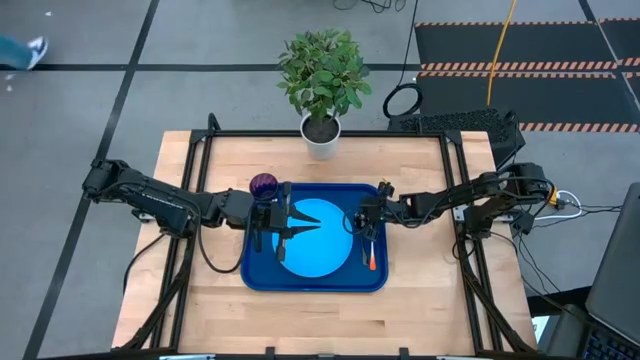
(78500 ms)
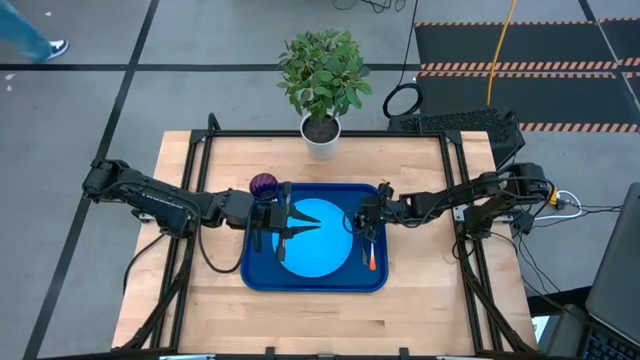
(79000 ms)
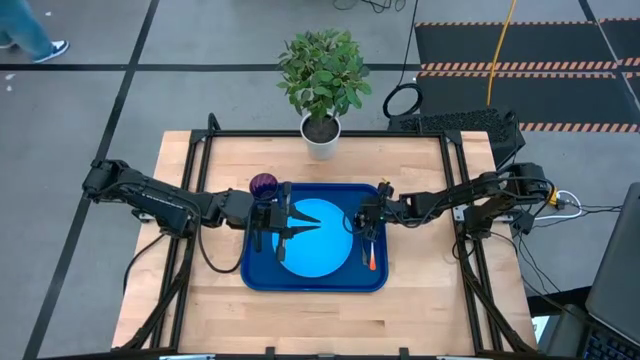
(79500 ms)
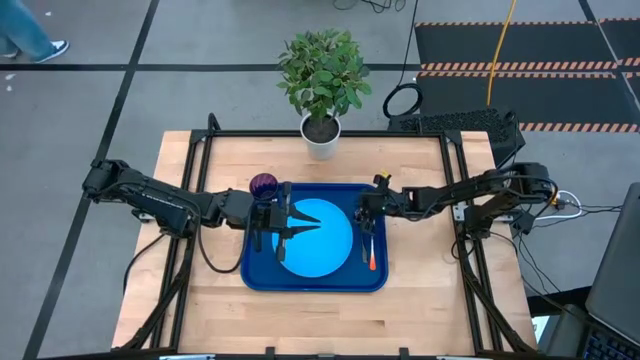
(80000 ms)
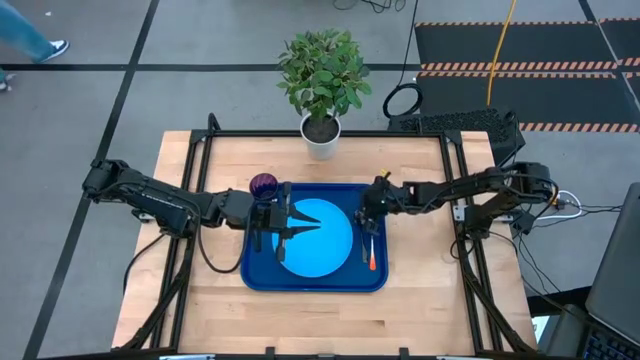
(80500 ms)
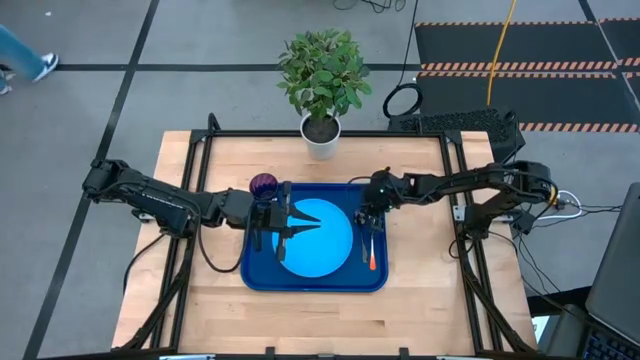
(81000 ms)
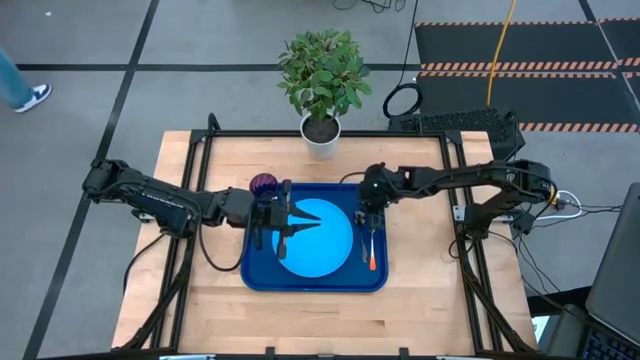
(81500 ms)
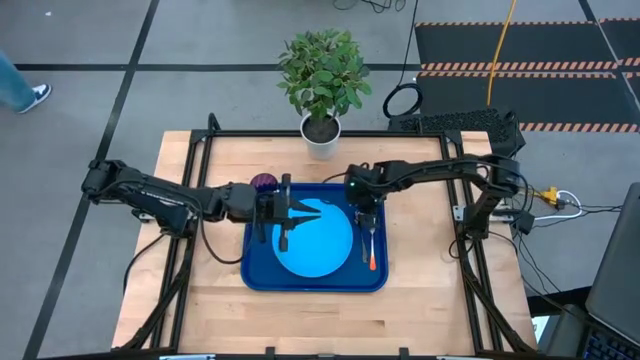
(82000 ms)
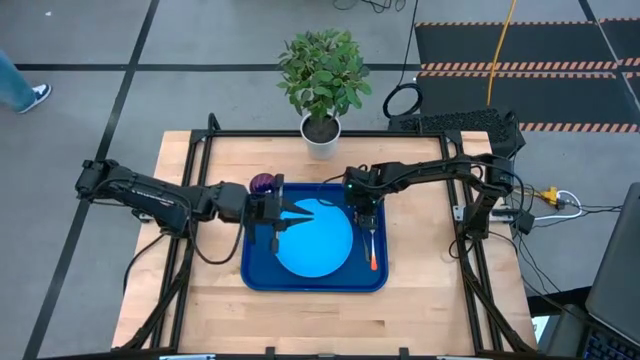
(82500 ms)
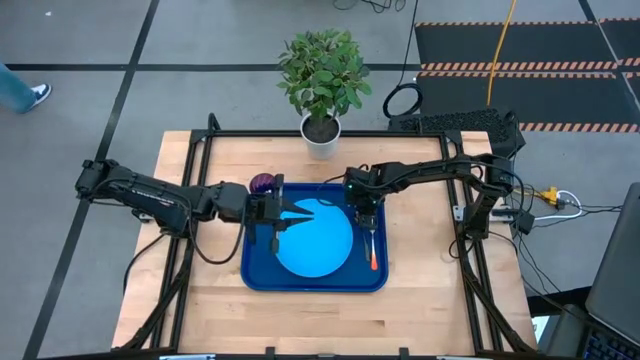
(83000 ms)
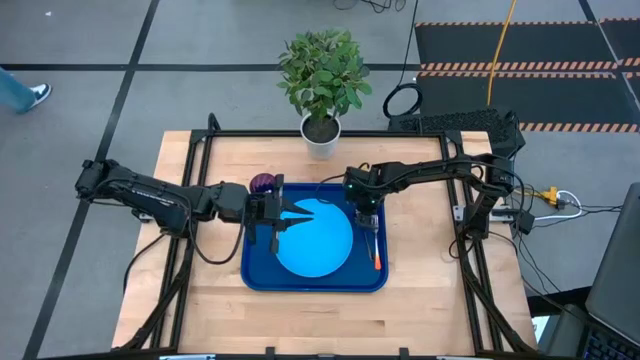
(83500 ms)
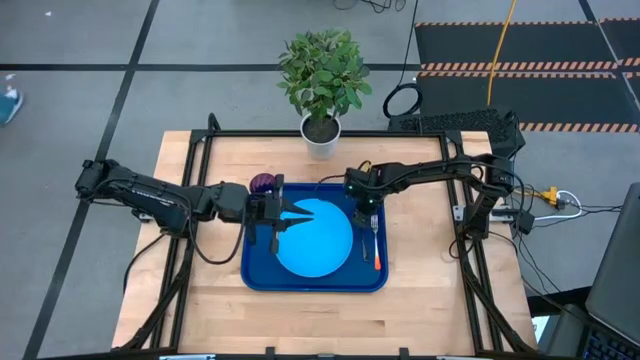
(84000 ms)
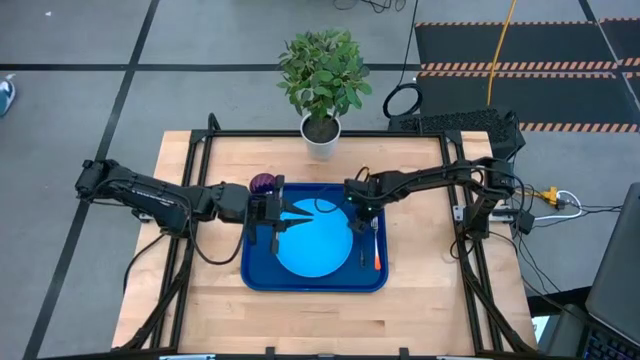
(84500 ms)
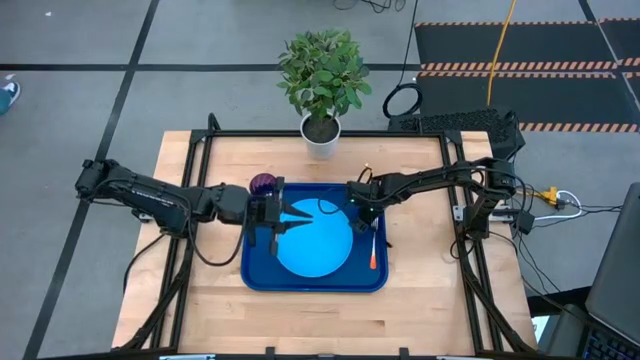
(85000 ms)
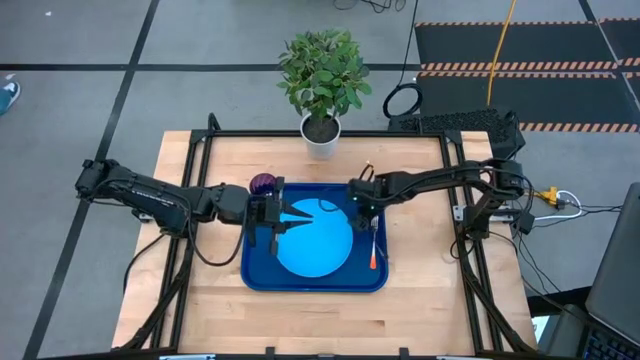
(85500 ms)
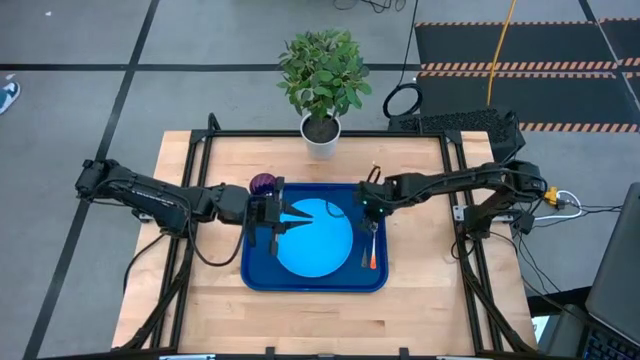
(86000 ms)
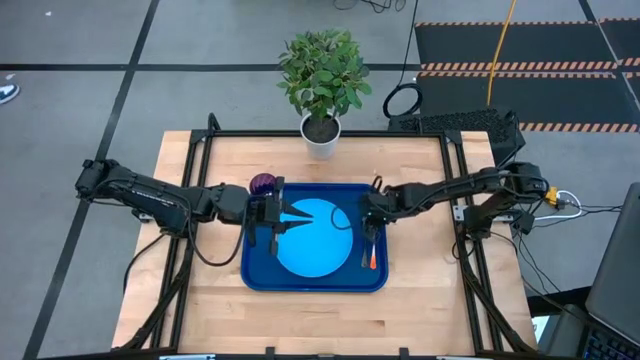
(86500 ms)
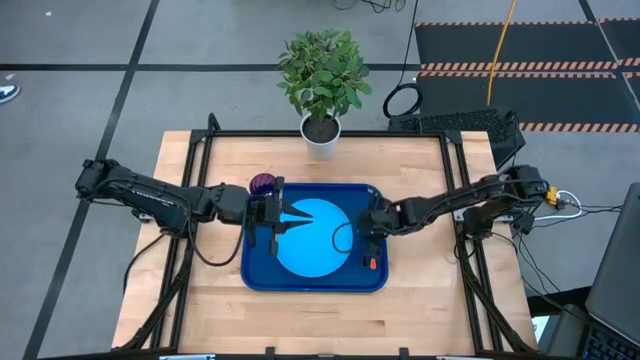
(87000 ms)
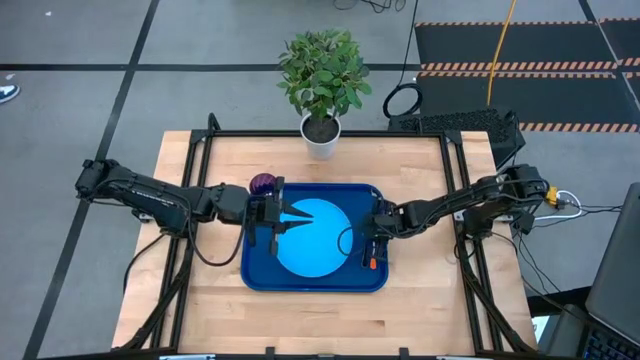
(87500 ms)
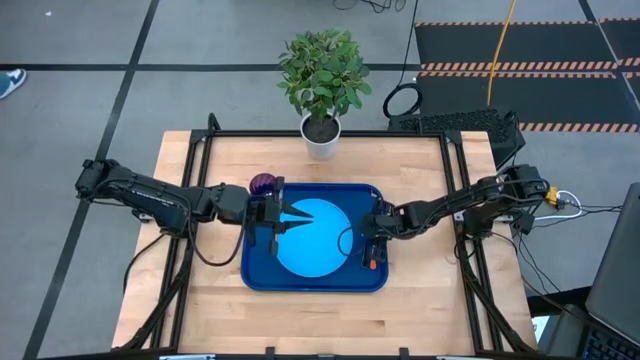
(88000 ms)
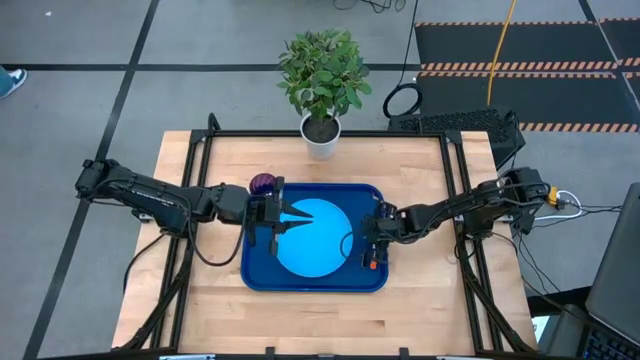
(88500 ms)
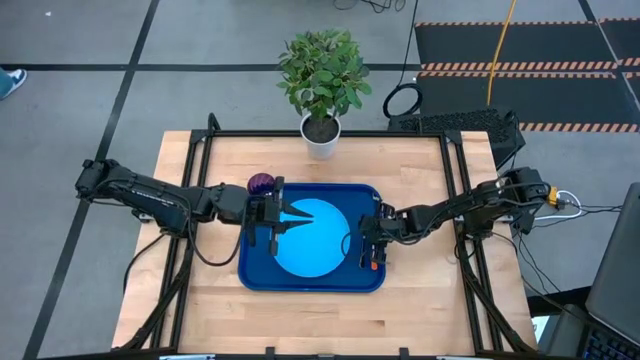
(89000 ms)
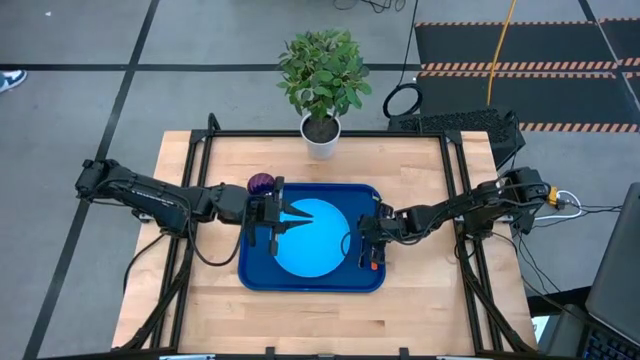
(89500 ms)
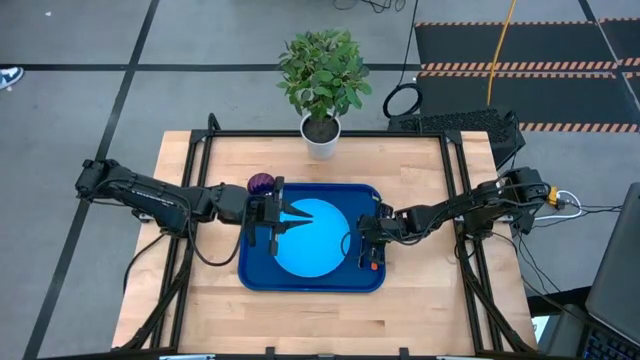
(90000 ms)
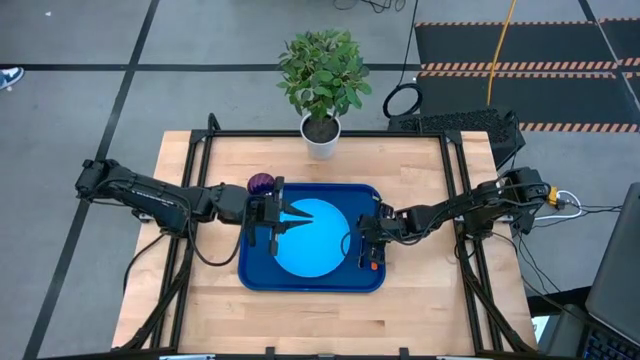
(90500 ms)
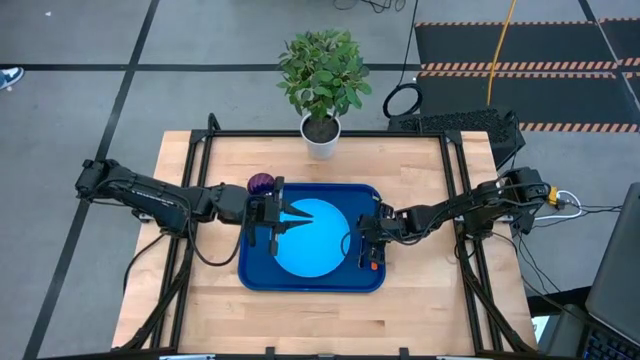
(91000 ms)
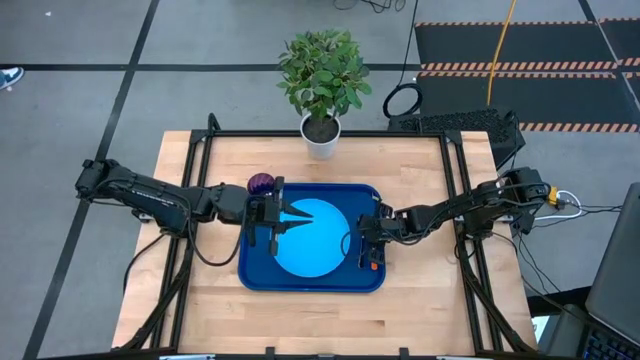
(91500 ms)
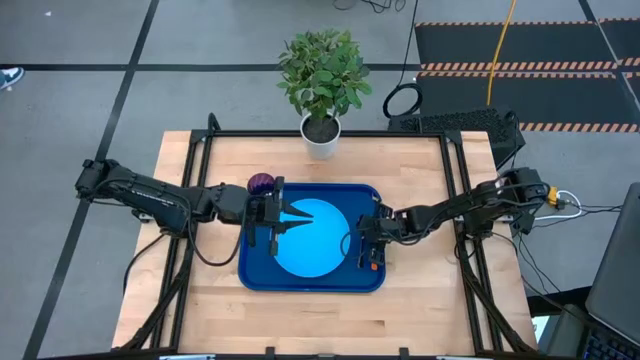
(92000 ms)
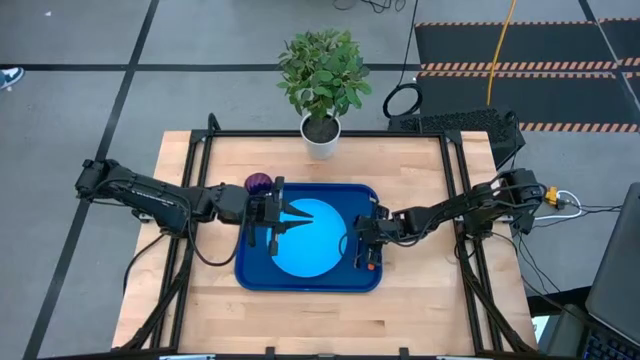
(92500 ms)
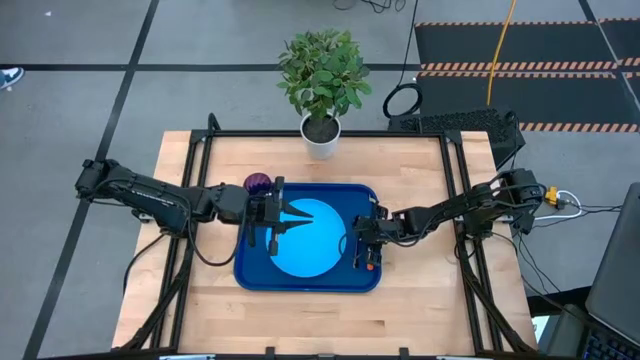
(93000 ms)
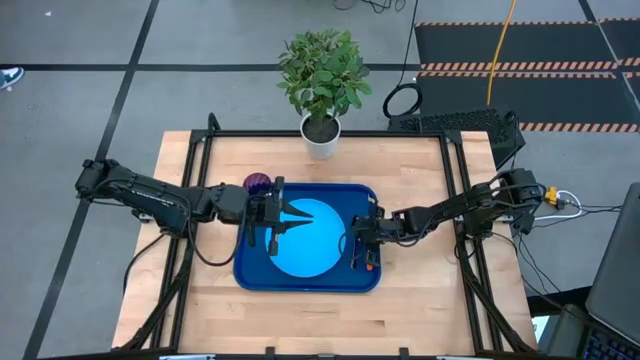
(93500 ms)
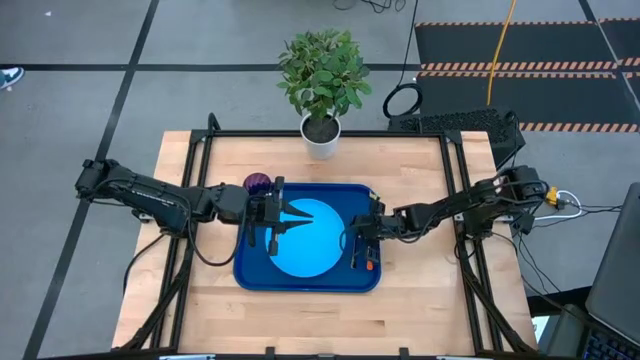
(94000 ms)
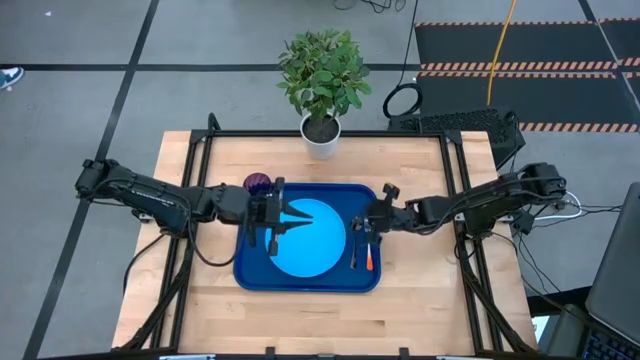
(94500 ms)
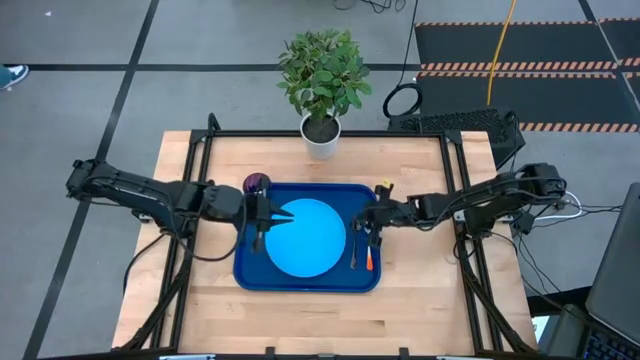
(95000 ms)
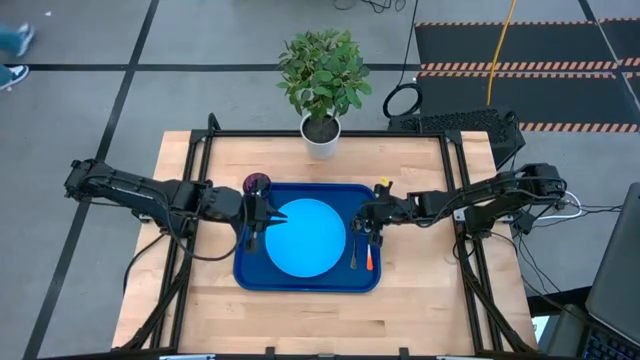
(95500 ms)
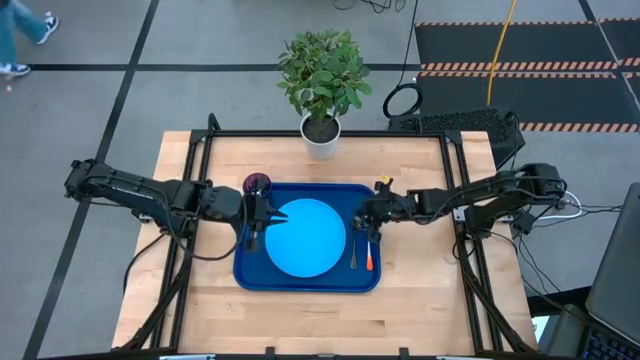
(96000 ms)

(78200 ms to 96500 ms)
Task: Pick and place plate/cup/fork/spoon on tray
Put the black spoon on the blue tray to the right of the light blue plate

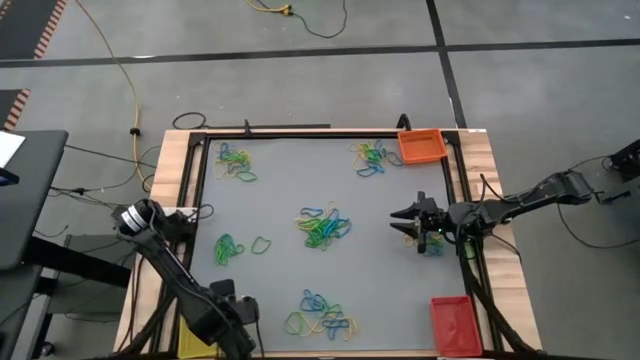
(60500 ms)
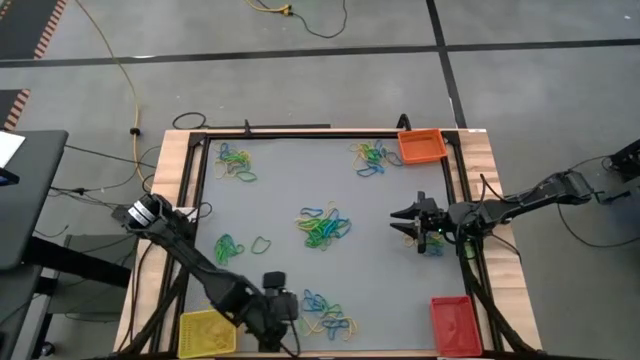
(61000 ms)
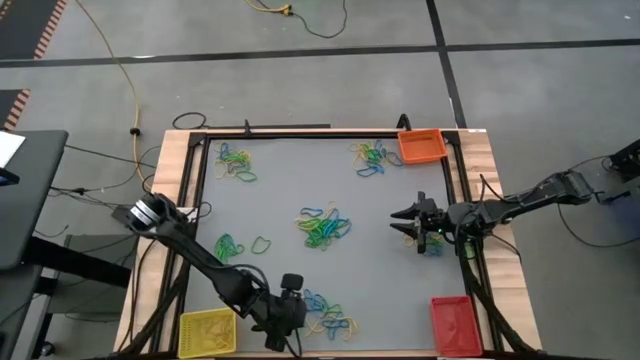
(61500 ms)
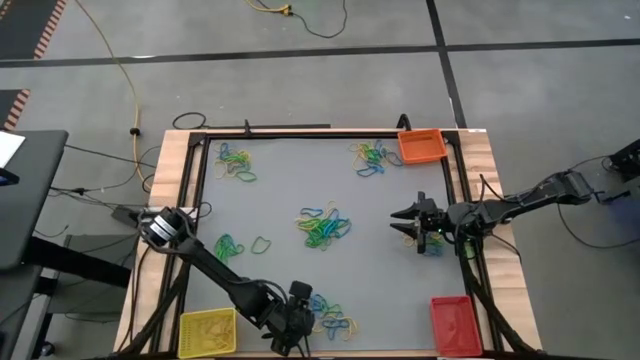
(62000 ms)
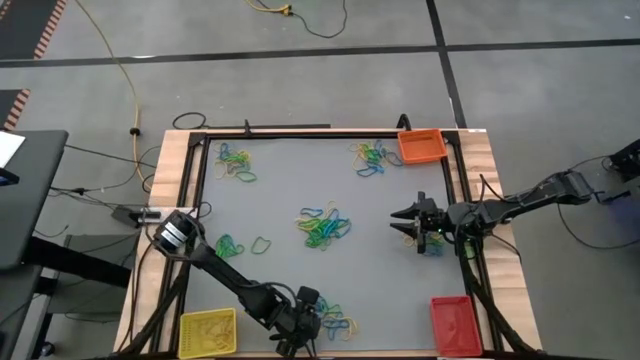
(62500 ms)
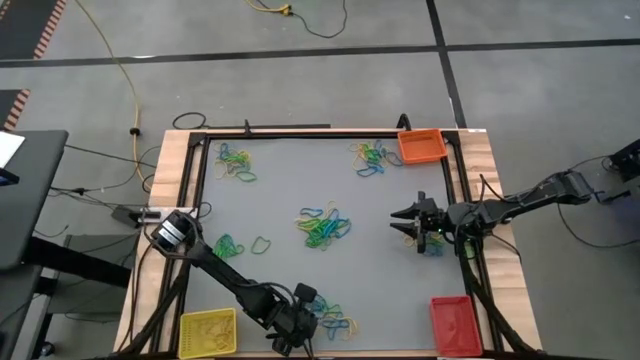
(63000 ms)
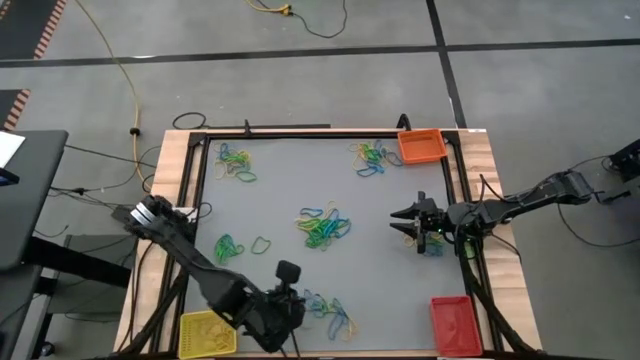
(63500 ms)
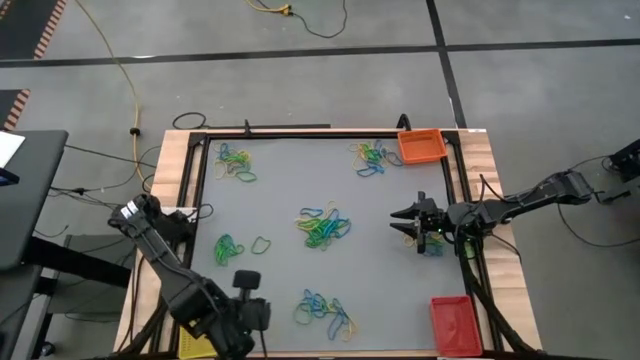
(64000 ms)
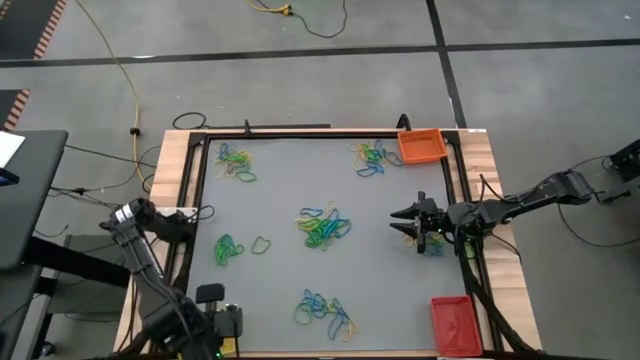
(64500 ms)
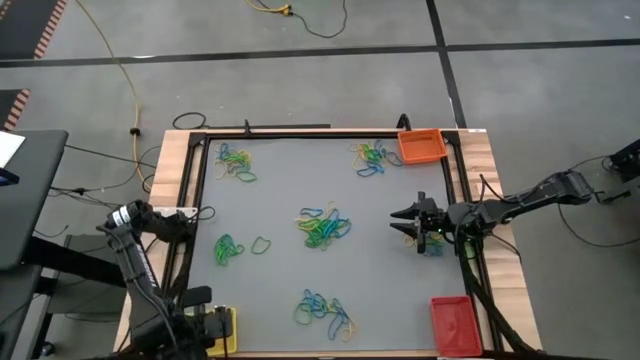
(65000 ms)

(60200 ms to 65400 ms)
Task: Sort rubber bands into baskets
Put the yellow rubber band into the yellow bin
